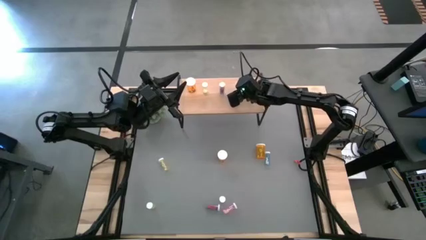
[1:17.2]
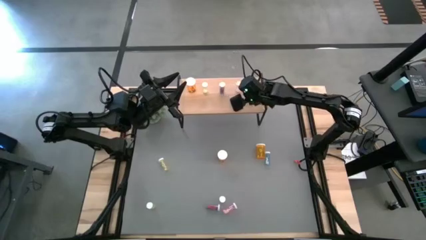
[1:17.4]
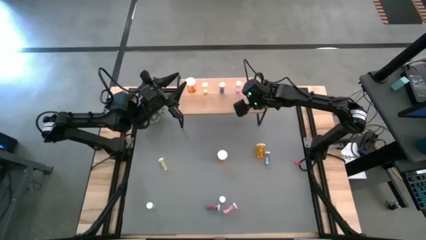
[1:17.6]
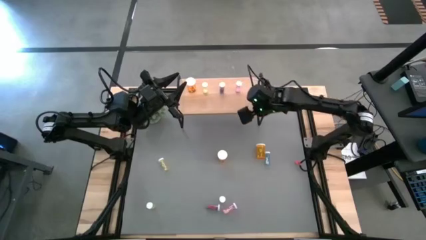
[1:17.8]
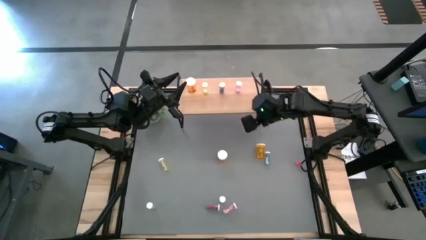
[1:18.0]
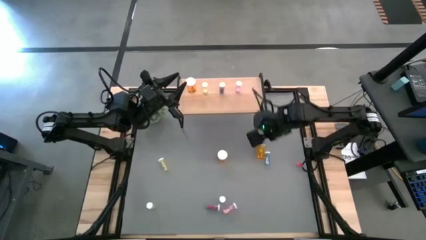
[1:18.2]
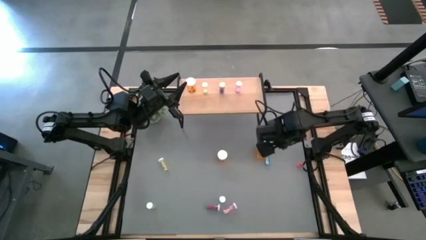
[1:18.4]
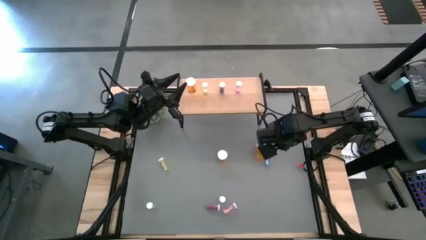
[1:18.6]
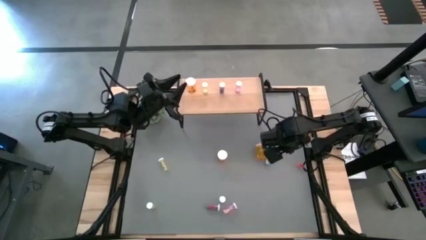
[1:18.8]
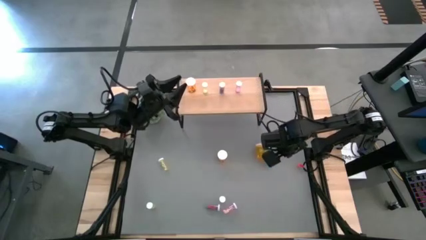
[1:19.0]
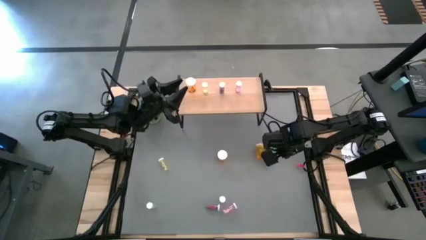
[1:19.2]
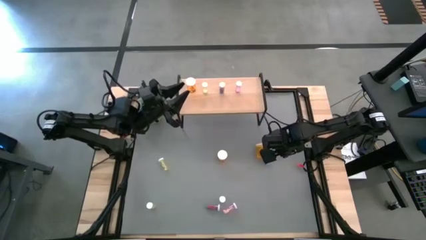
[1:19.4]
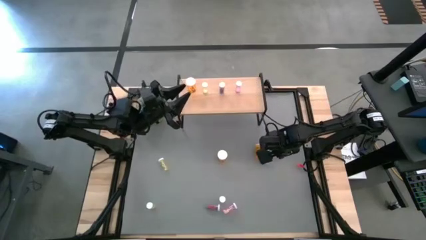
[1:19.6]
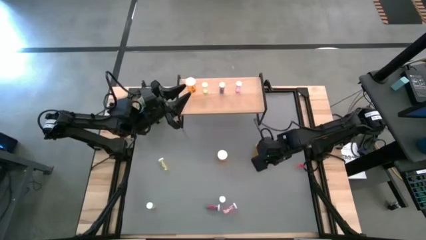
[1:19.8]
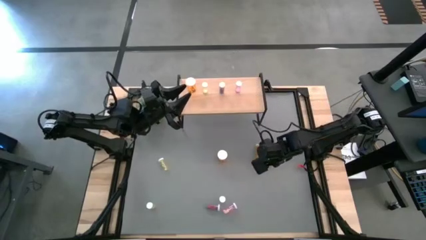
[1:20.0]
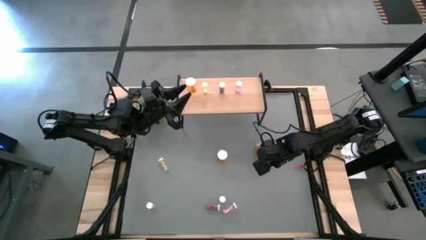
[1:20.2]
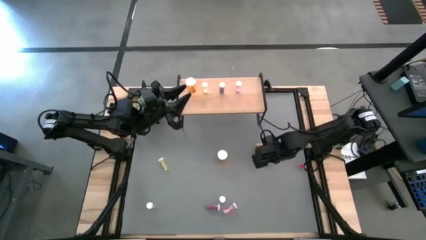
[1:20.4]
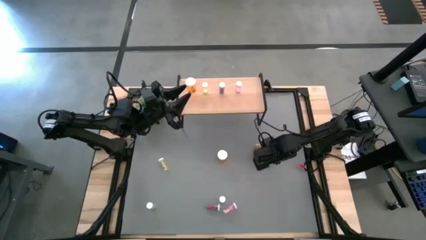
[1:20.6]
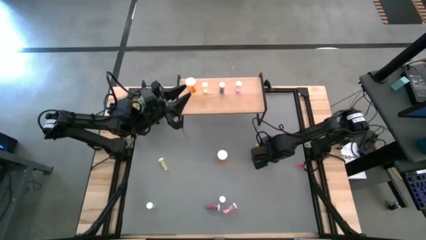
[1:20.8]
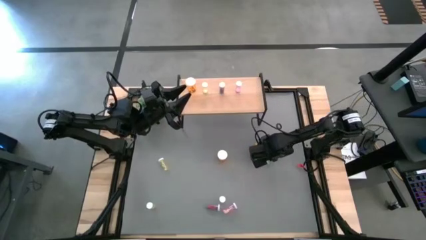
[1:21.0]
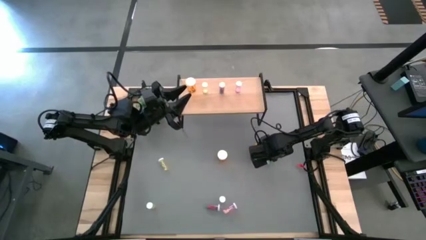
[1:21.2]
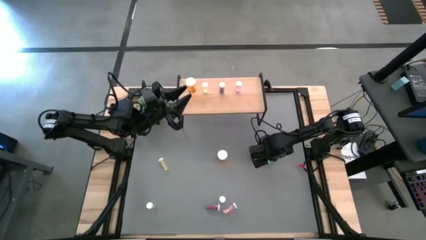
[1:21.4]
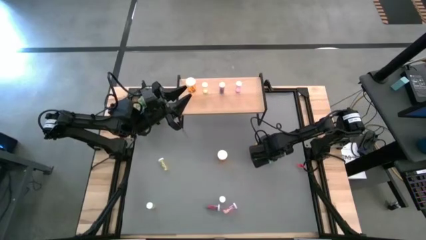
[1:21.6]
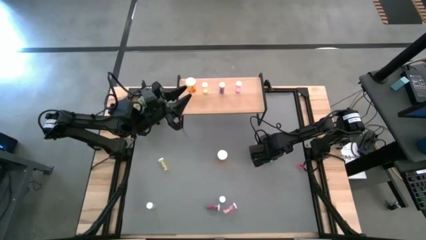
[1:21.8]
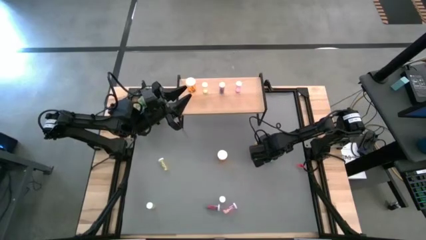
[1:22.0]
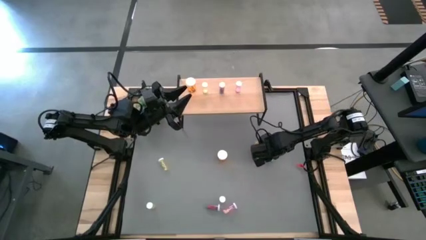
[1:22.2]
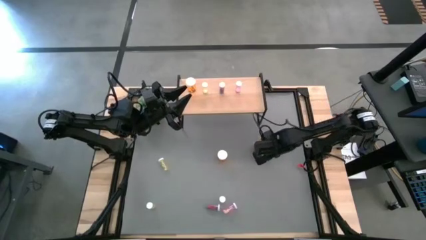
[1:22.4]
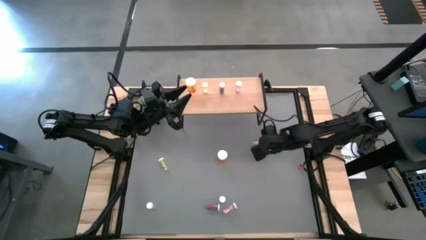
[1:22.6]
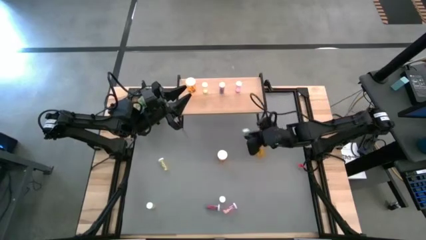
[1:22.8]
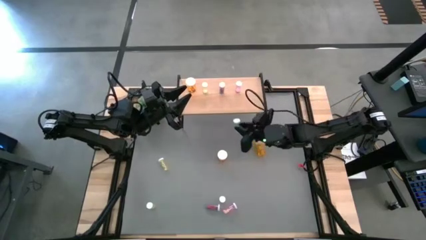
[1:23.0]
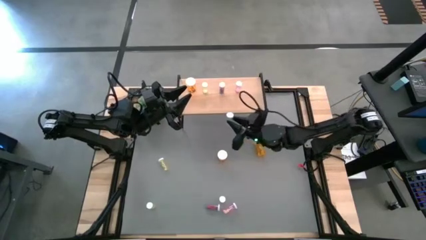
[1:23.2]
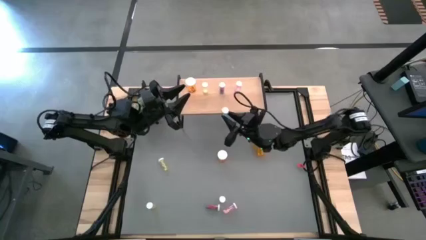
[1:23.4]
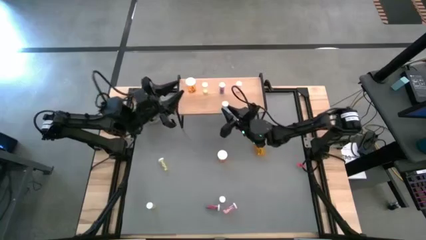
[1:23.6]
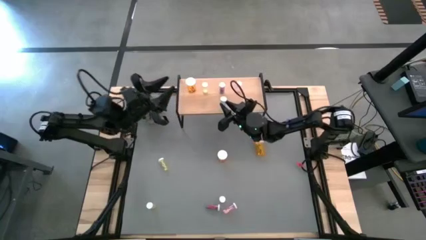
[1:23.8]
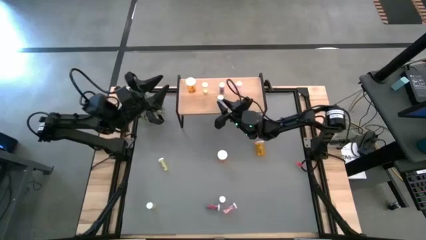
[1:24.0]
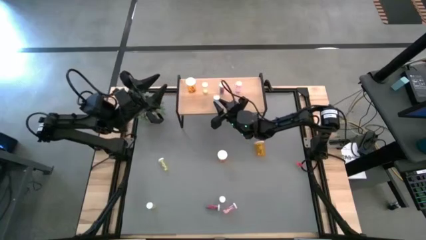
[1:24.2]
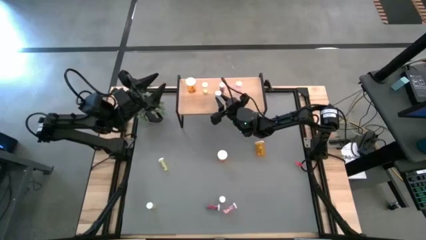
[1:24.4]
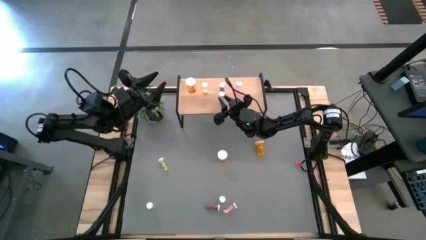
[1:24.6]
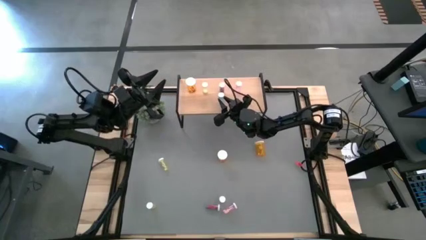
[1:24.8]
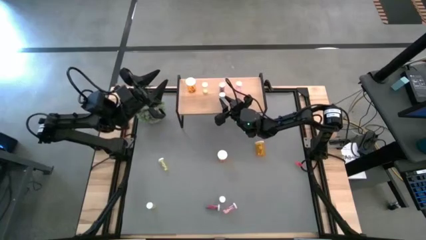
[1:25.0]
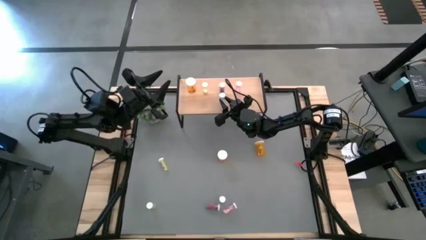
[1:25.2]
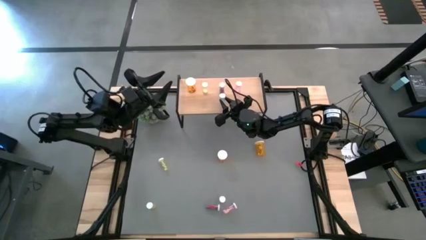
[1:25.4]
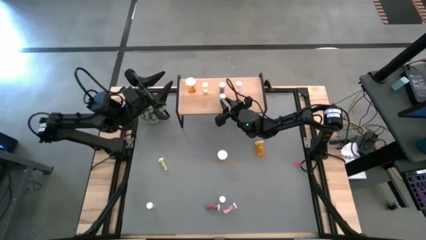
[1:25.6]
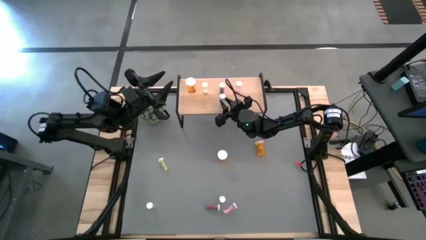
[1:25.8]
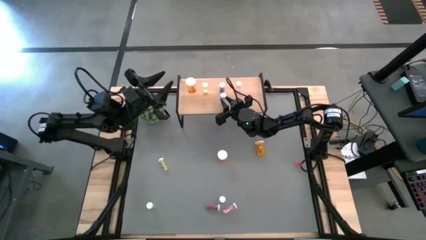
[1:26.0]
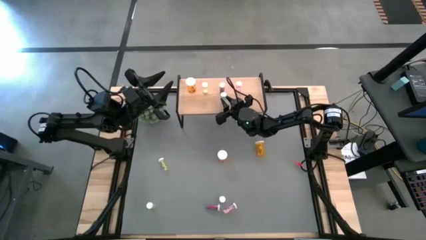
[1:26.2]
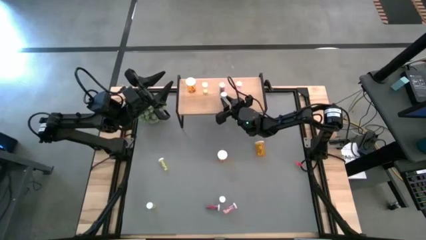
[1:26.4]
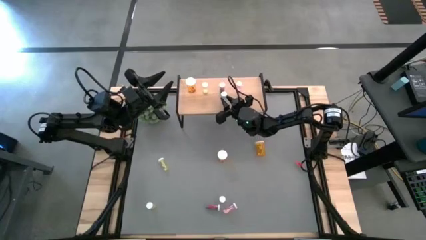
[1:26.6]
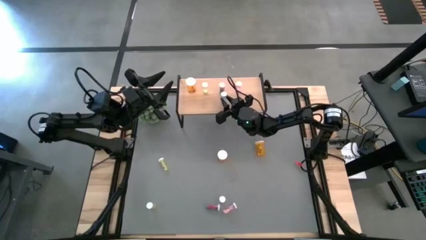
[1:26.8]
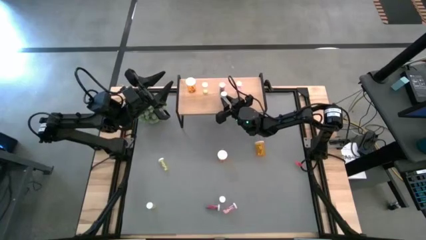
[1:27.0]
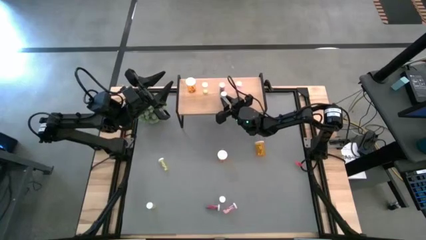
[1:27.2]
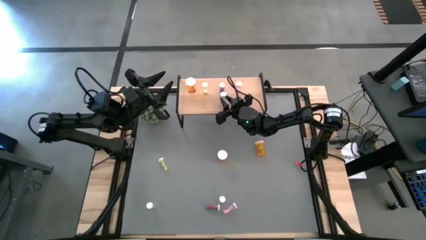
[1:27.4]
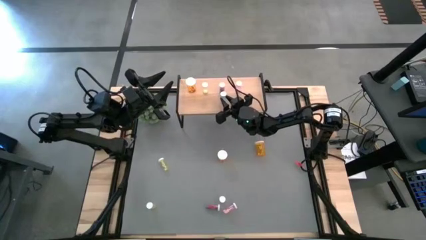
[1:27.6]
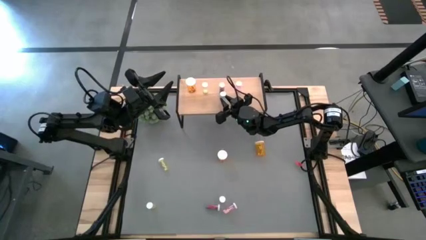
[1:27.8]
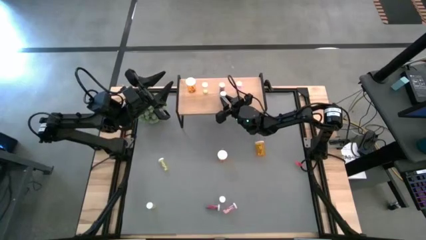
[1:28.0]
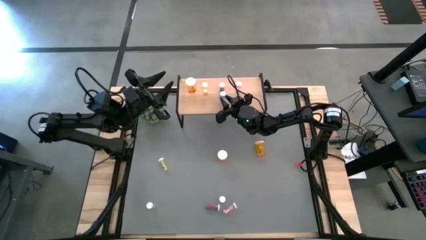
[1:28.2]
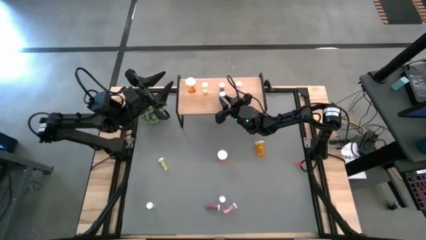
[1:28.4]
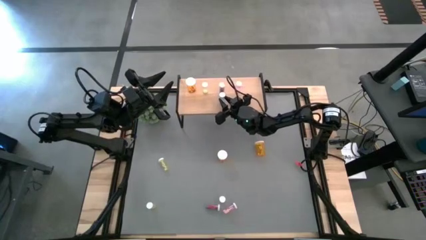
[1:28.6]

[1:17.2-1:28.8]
Task: Pick and place medicine bottles onto shelf by color
Put the top blue pill bottle on the shelf aligned with the other blue pill bottle
